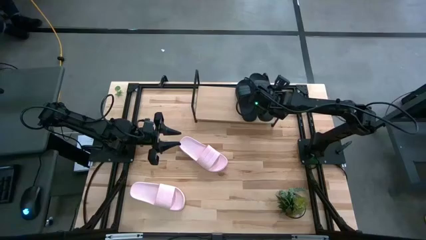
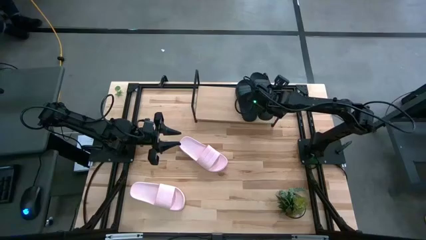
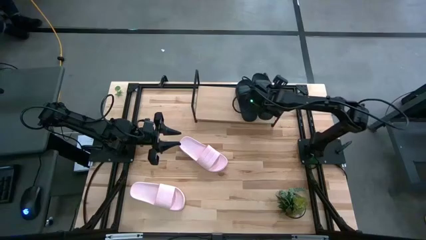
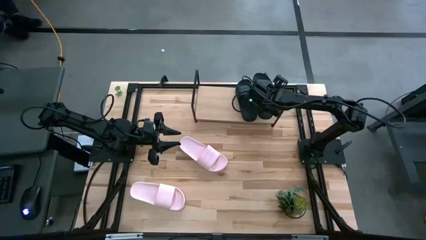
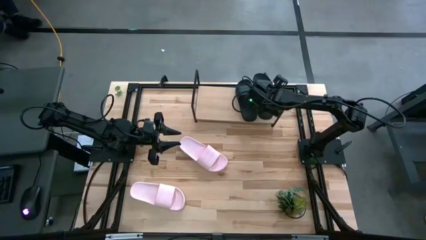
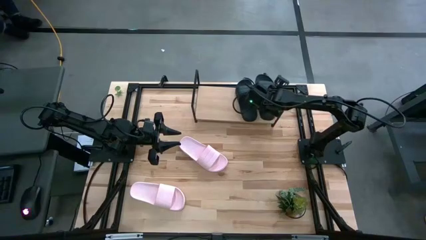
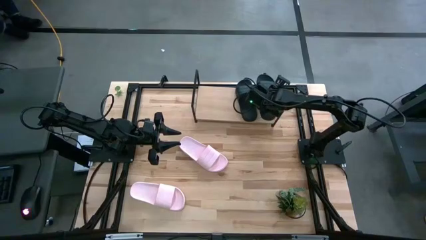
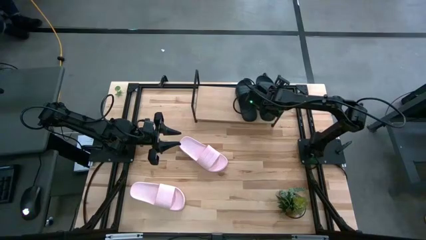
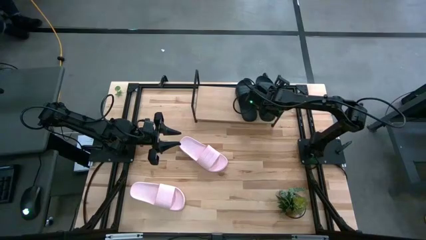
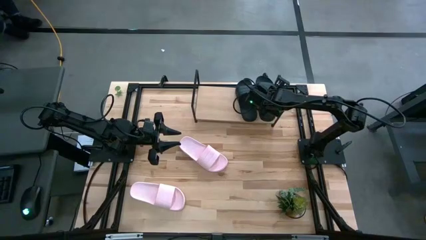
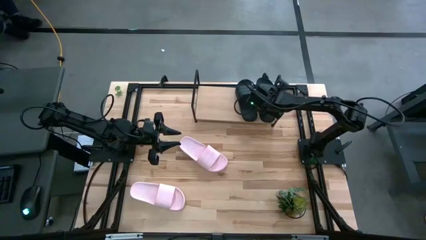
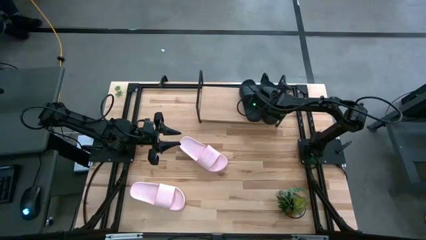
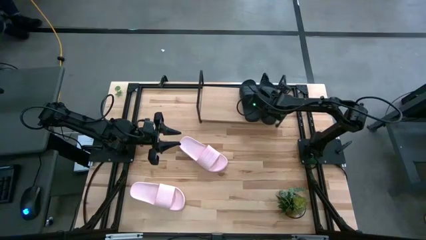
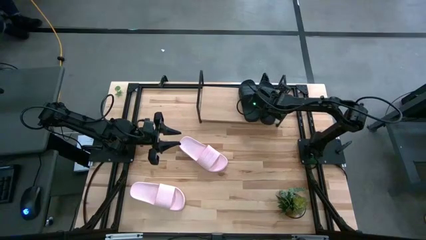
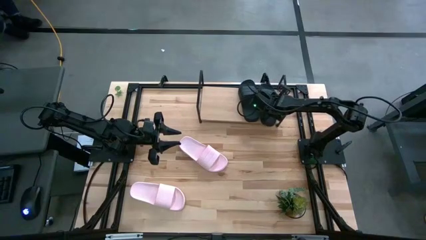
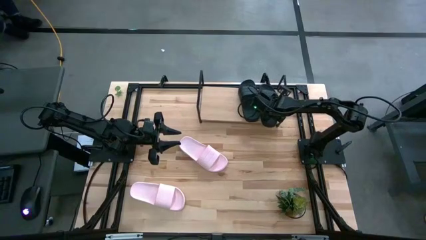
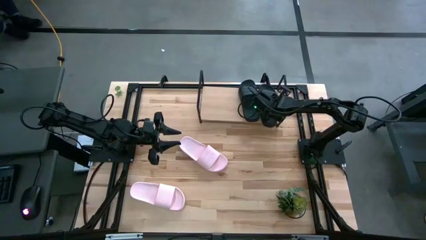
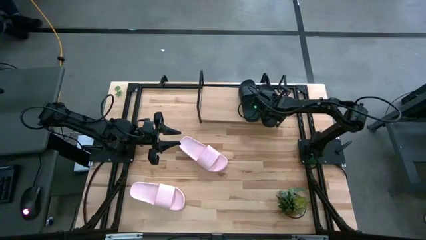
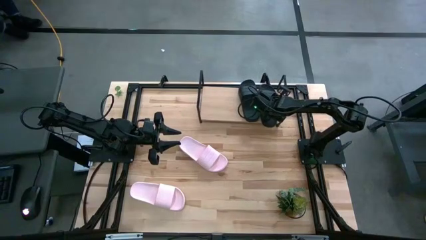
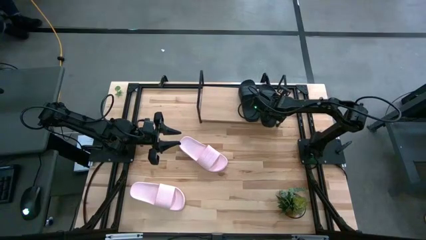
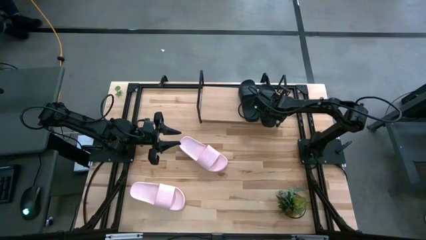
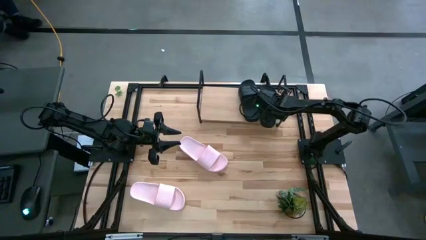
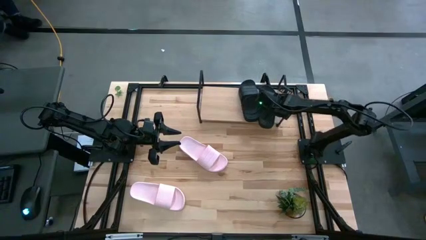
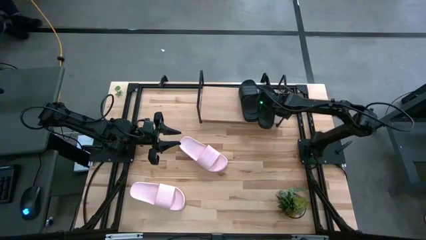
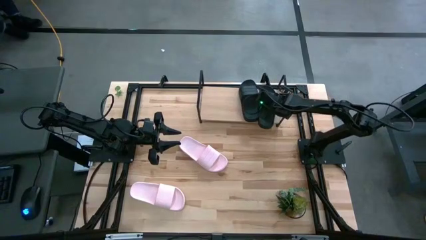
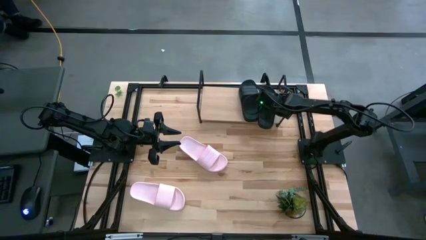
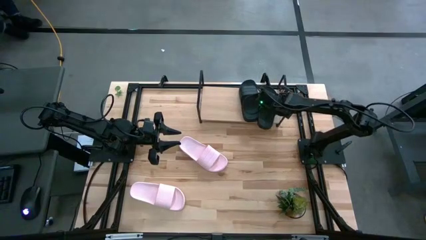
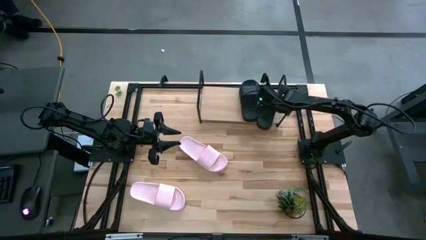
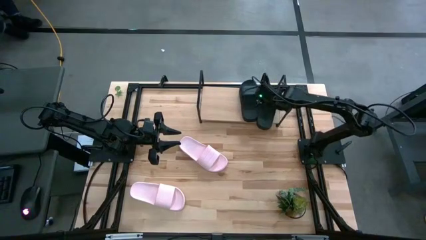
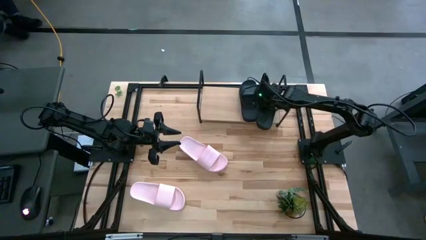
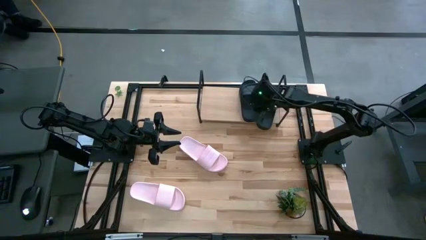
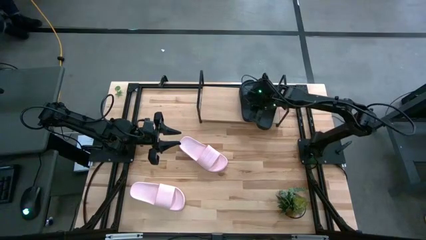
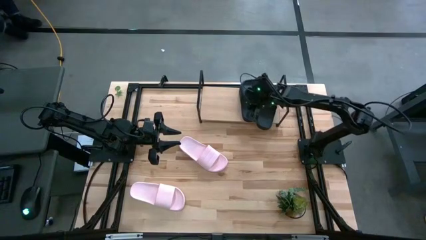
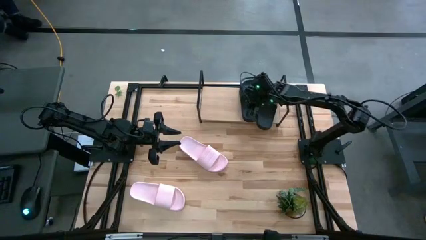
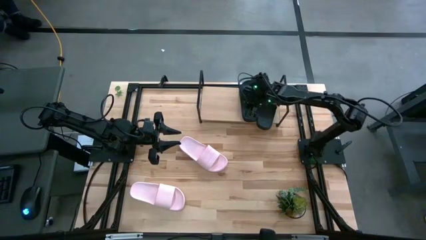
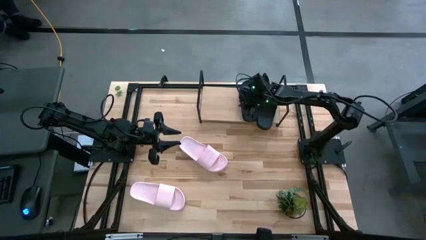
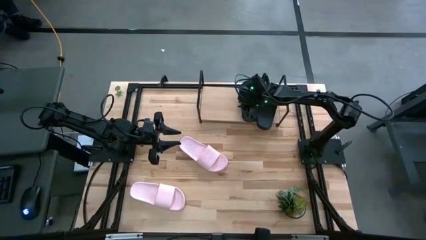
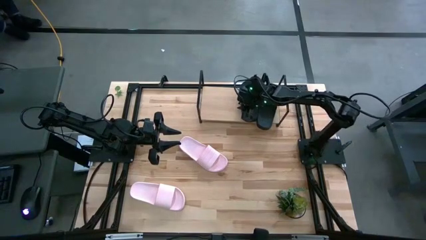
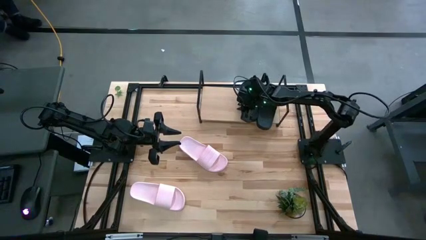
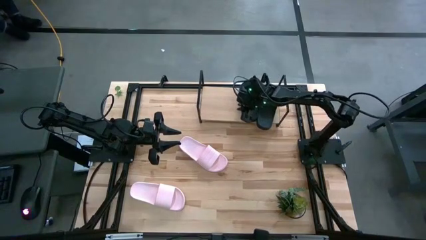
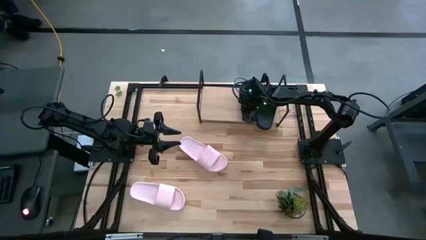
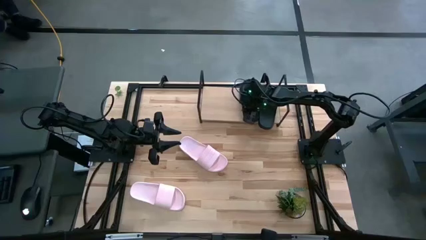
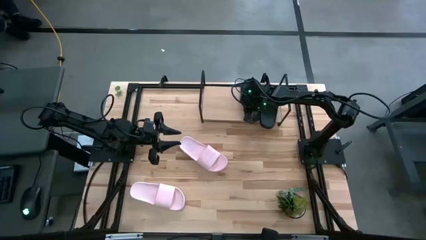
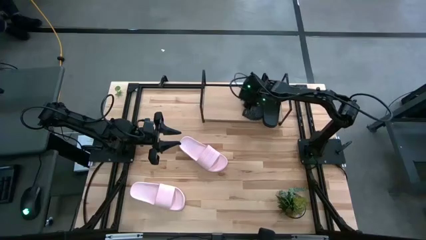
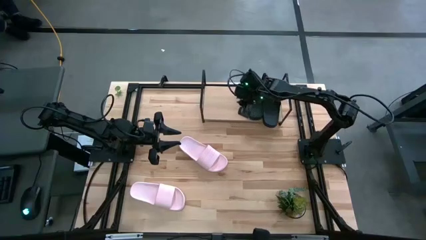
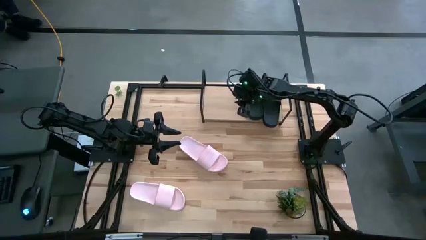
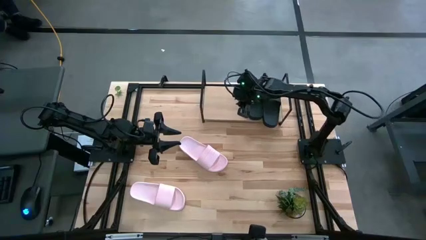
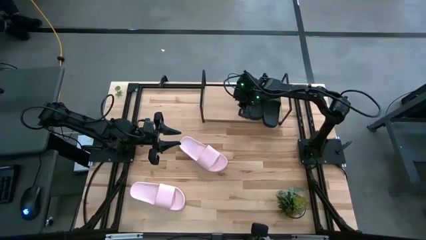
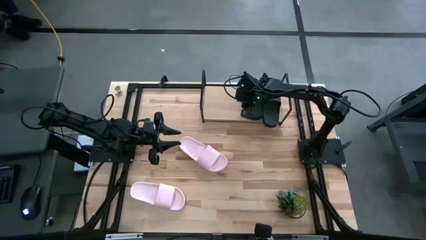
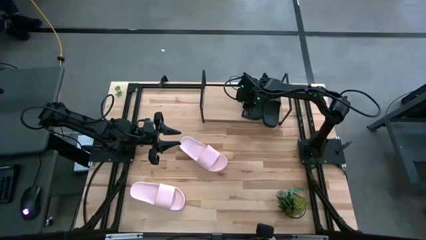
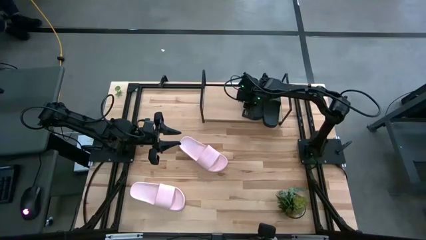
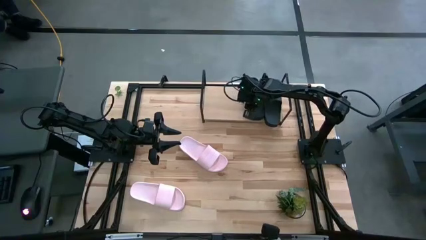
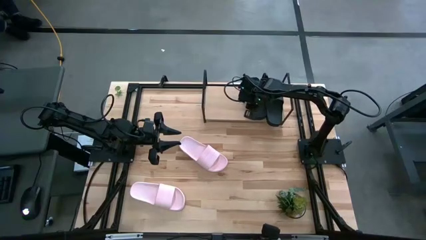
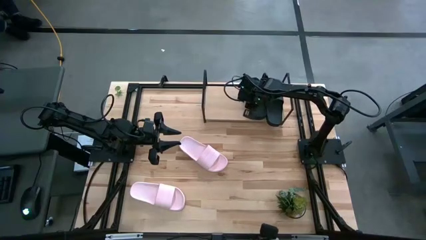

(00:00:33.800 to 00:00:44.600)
Task: Pick and place slides into the shelf
Put the black slides on the shelf

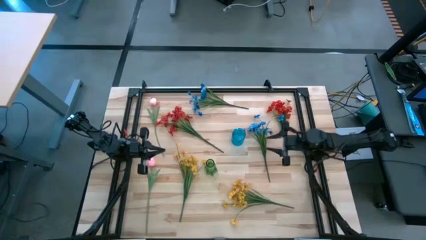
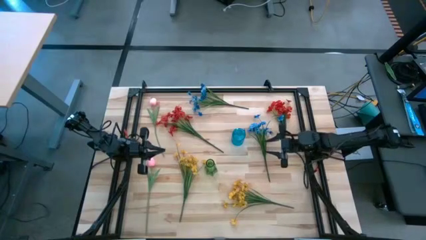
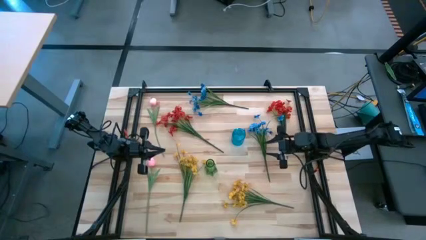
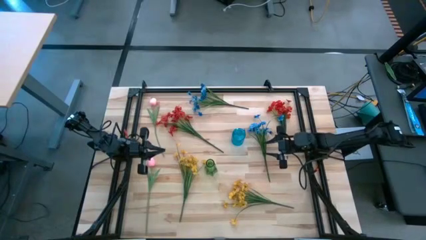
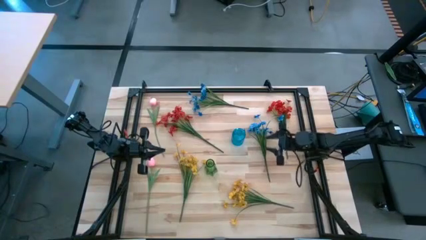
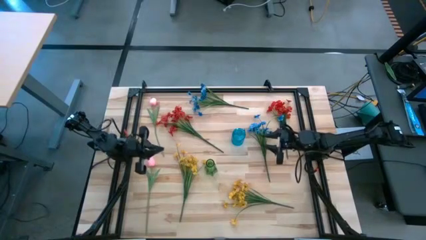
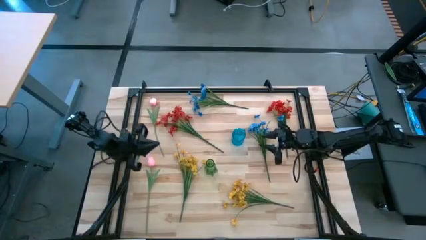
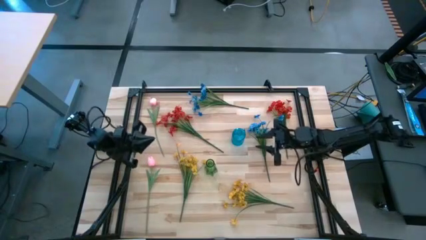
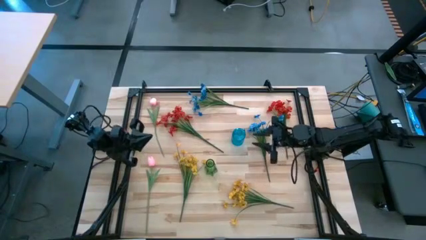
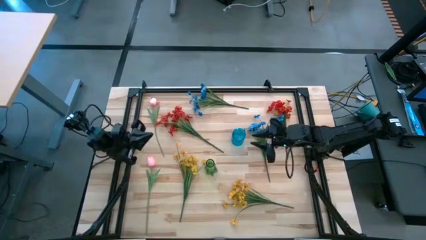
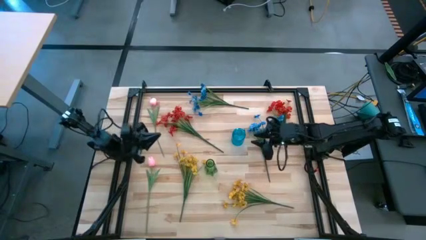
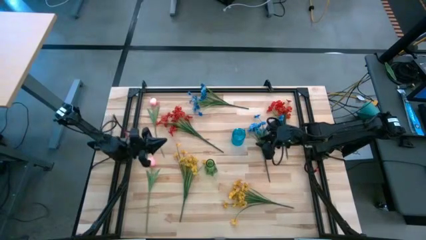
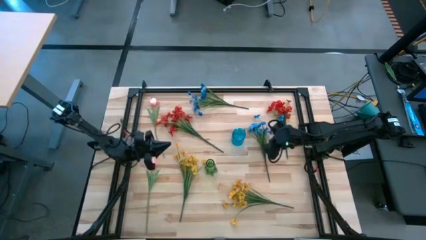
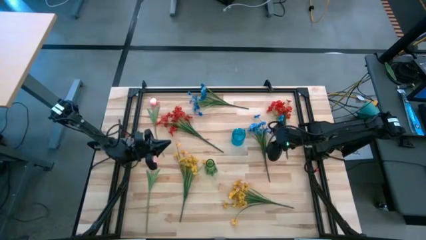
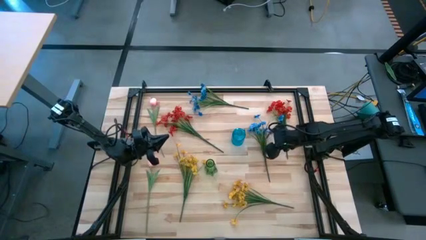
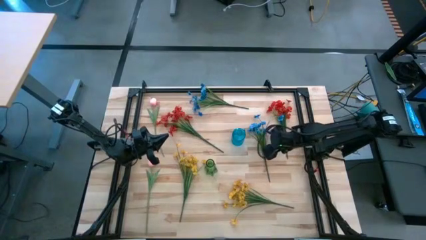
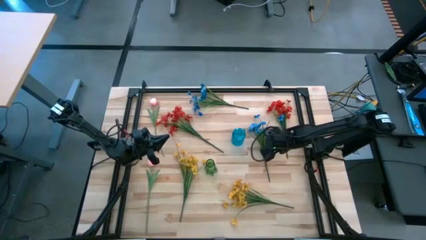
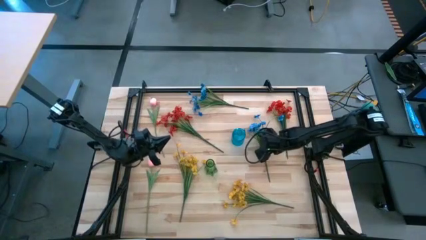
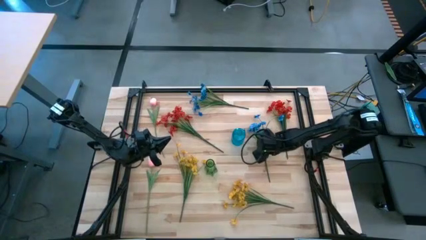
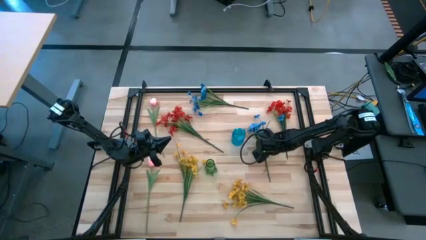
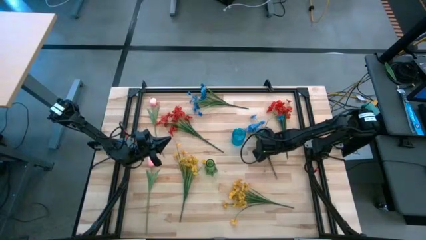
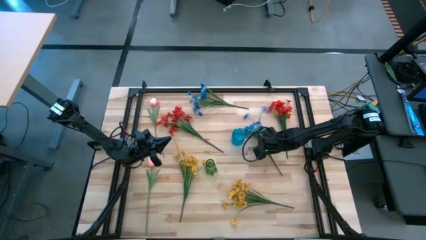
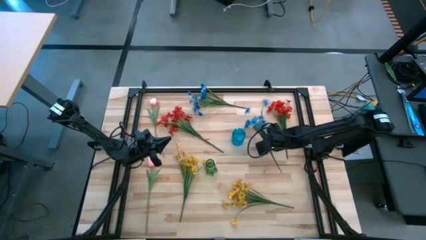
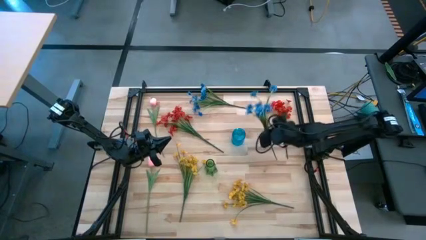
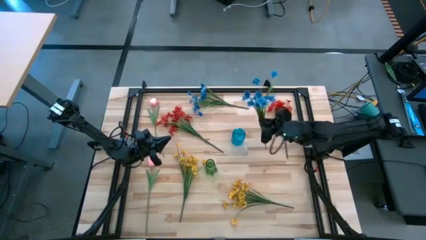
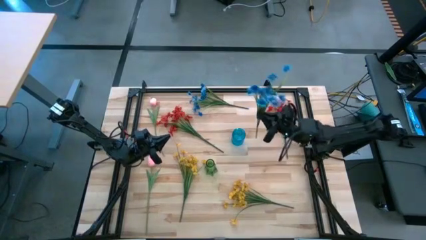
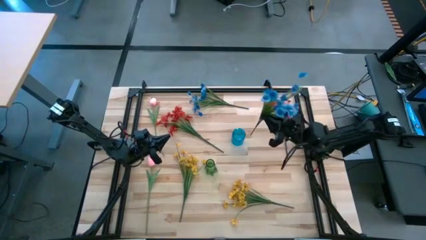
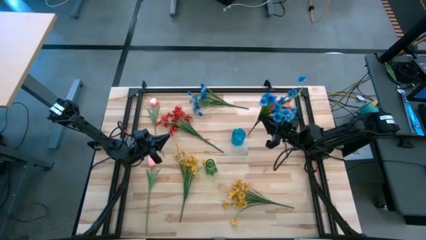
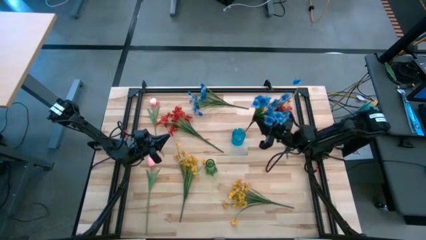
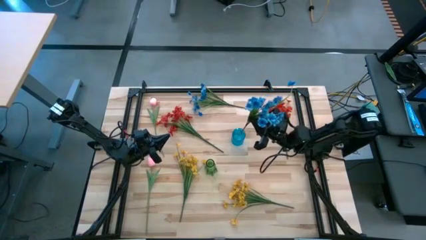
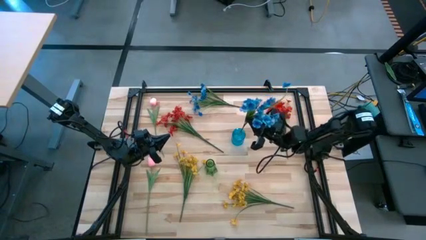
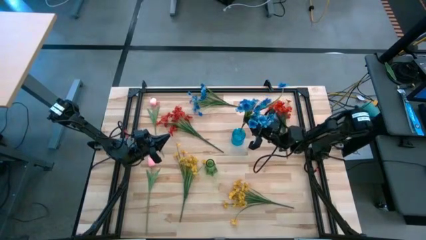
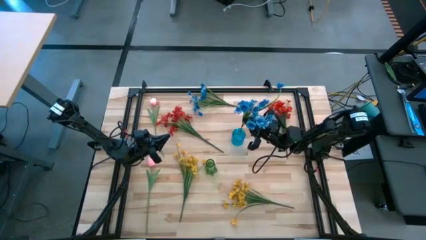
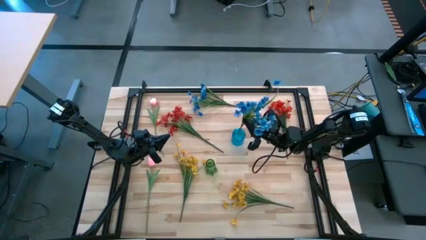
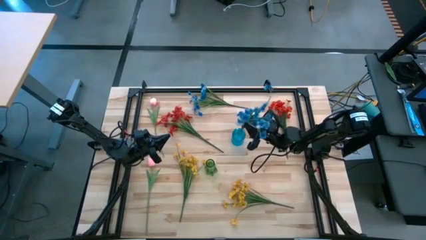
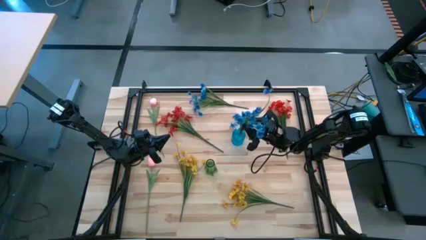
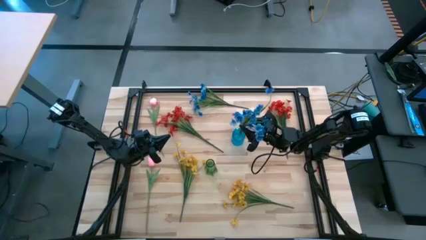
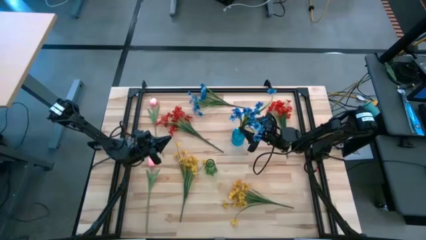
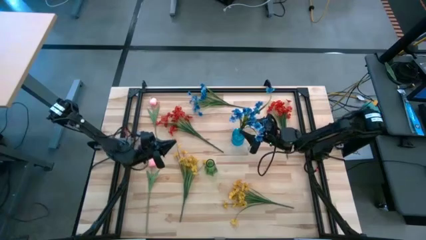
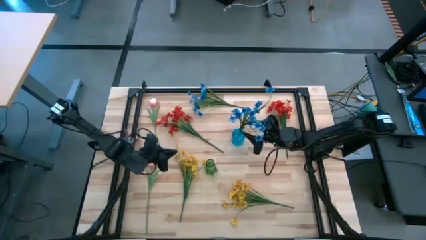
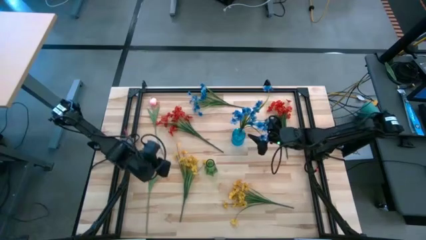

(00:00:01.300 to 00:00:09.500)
Task: Sort flowers into vase by color
Put the bottom blue flowers into the blue flower vase
